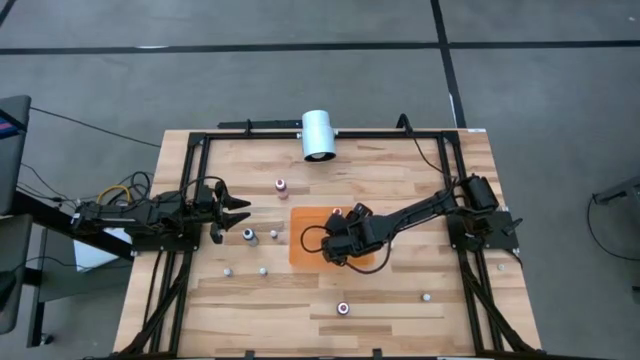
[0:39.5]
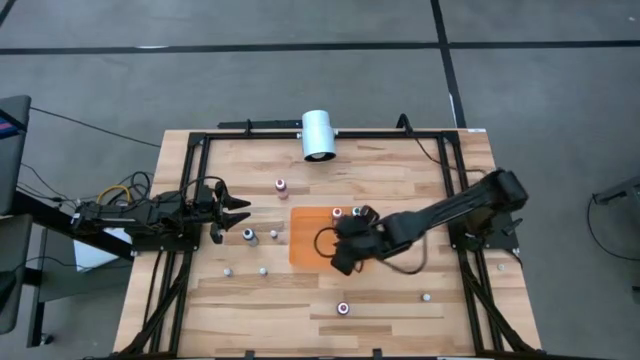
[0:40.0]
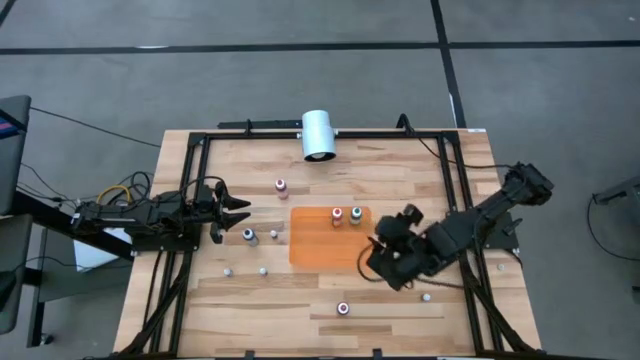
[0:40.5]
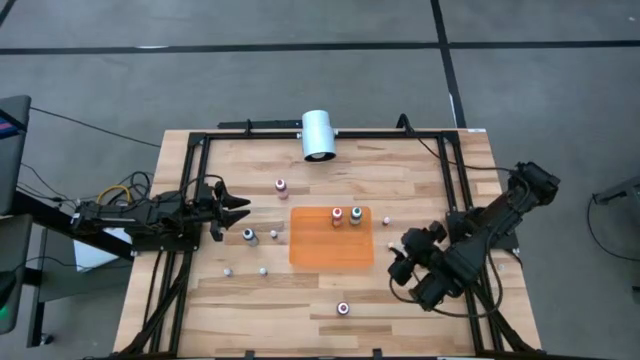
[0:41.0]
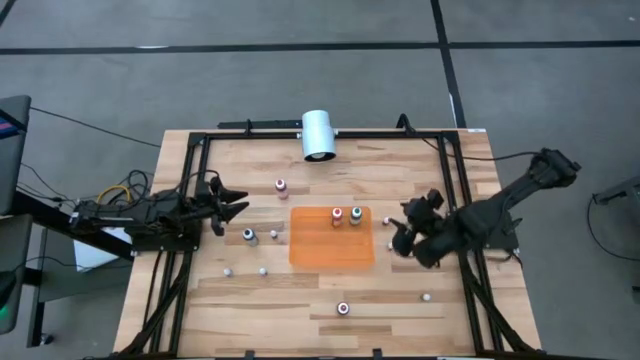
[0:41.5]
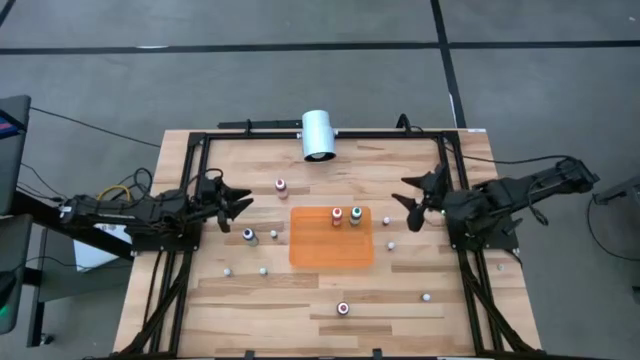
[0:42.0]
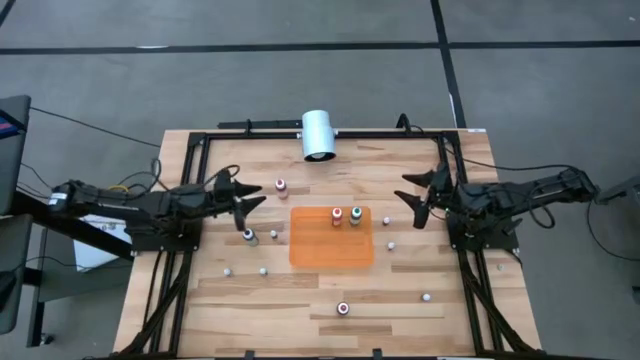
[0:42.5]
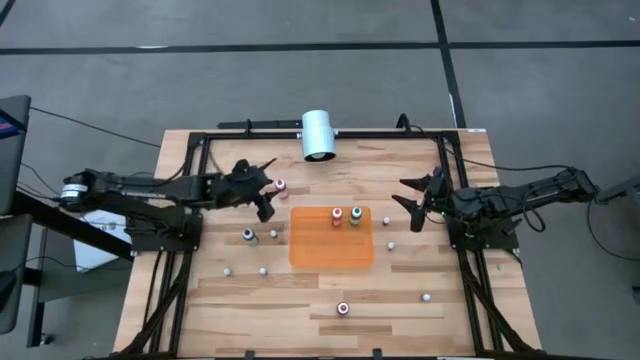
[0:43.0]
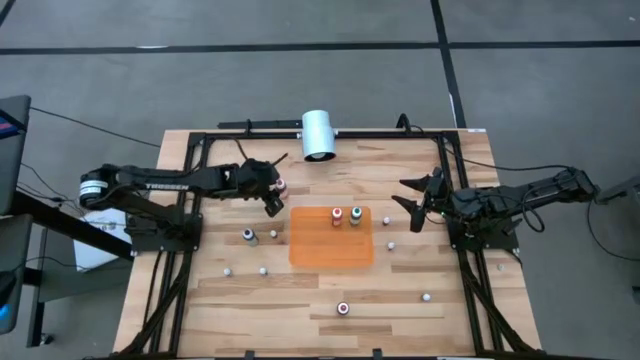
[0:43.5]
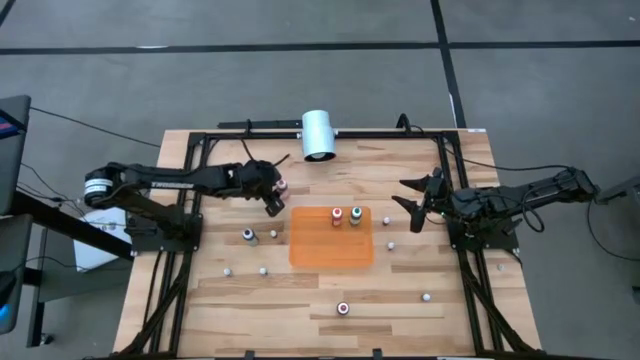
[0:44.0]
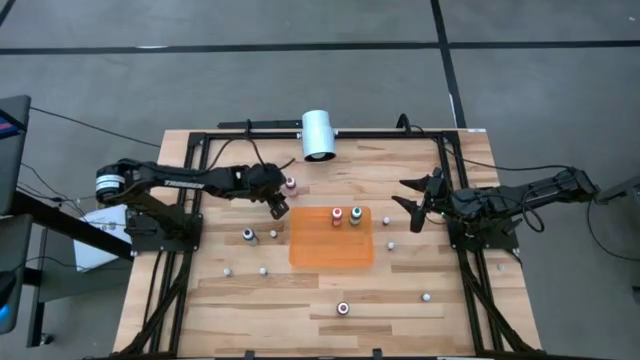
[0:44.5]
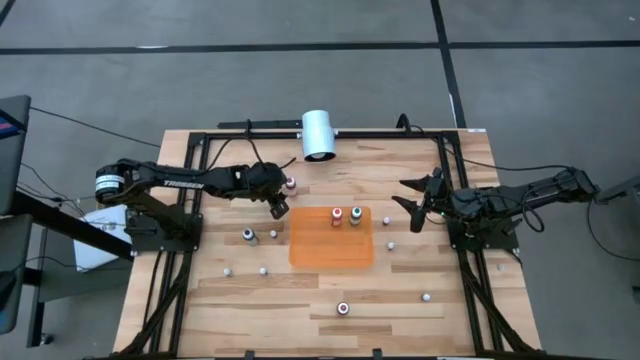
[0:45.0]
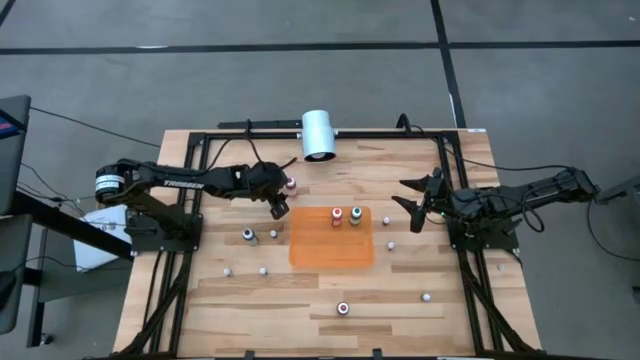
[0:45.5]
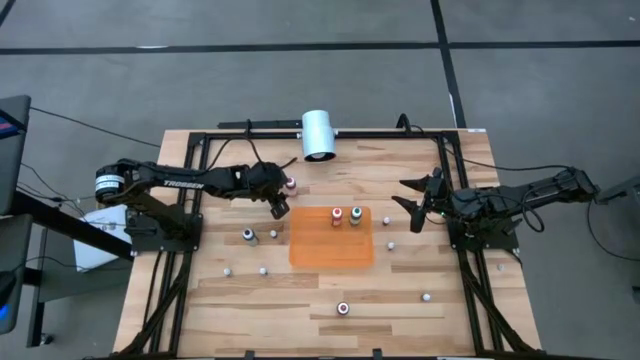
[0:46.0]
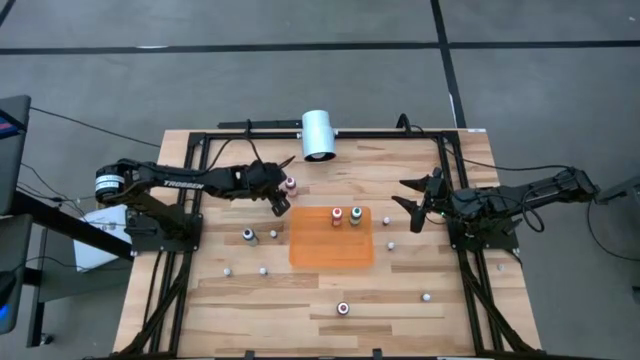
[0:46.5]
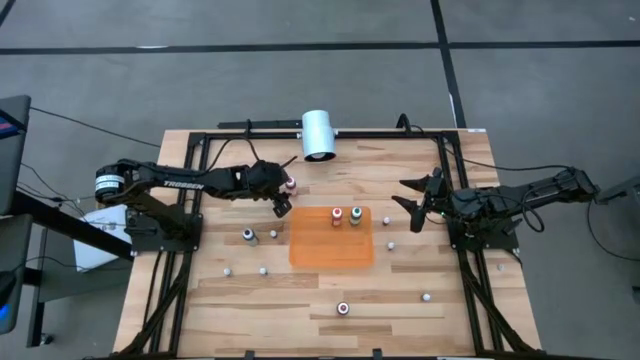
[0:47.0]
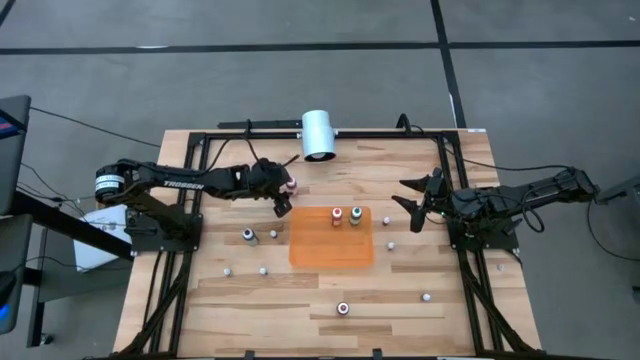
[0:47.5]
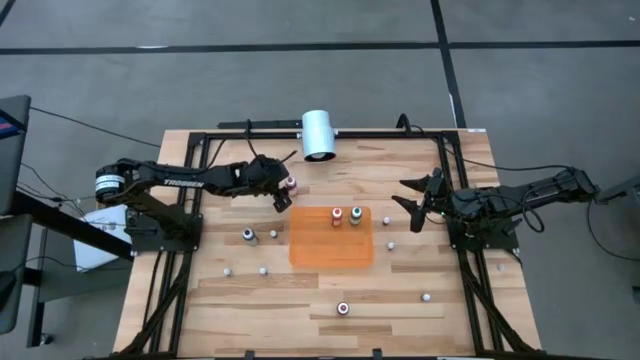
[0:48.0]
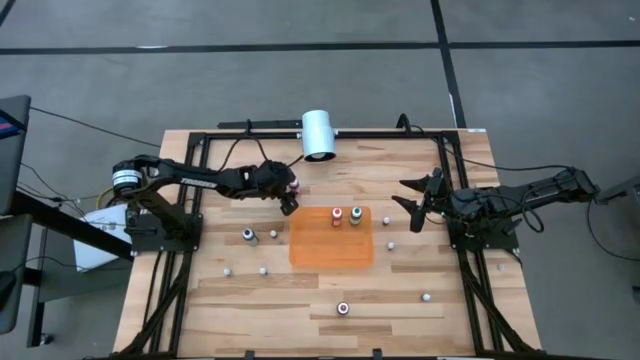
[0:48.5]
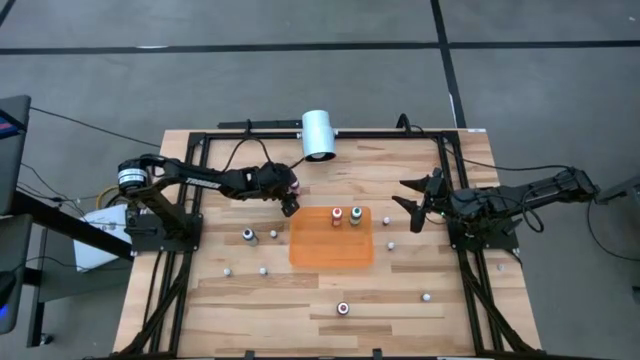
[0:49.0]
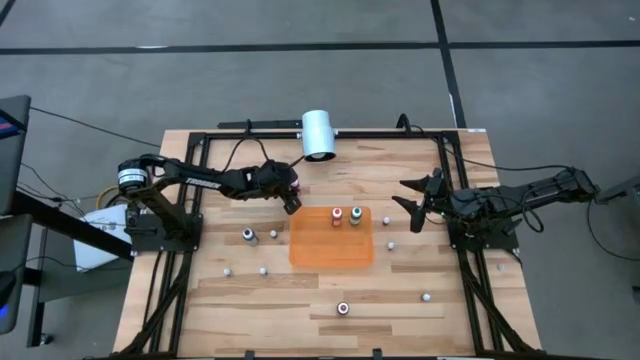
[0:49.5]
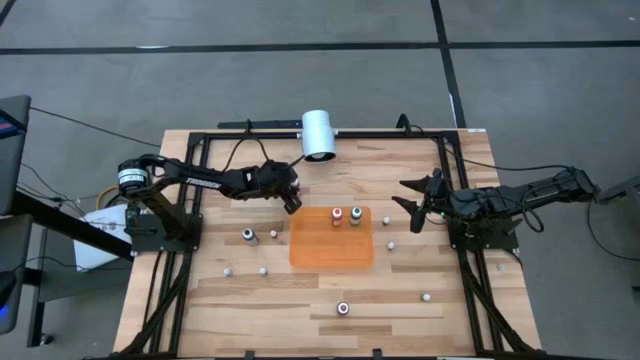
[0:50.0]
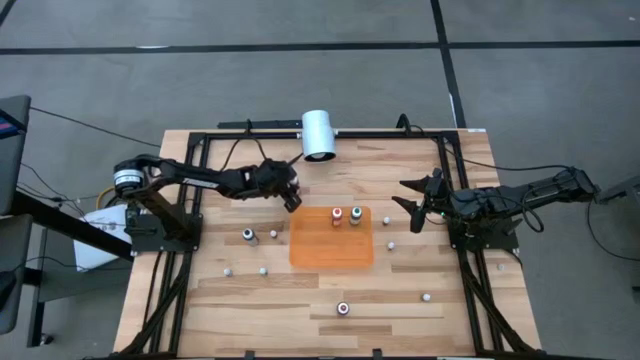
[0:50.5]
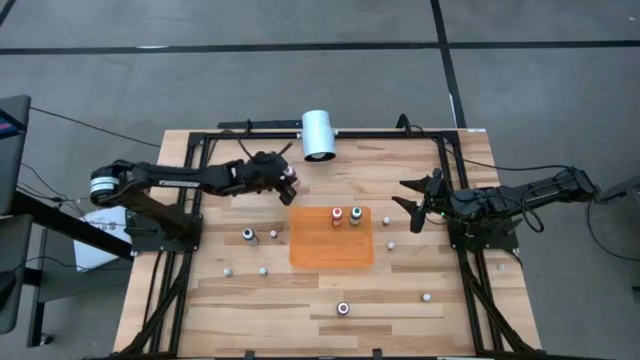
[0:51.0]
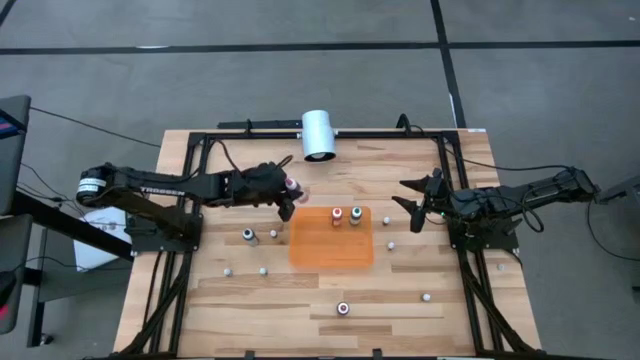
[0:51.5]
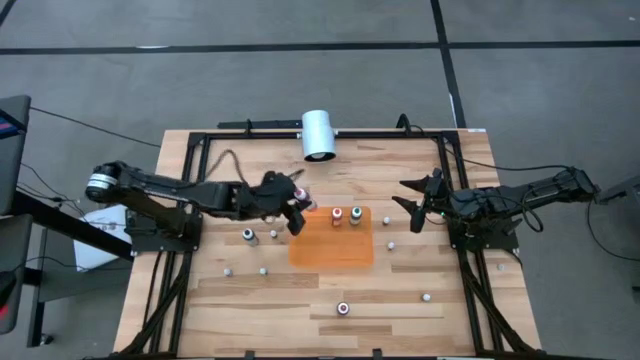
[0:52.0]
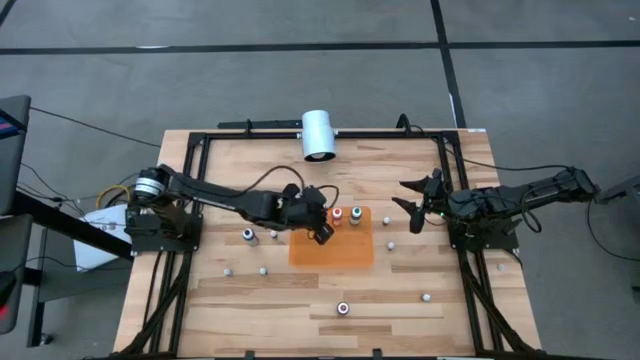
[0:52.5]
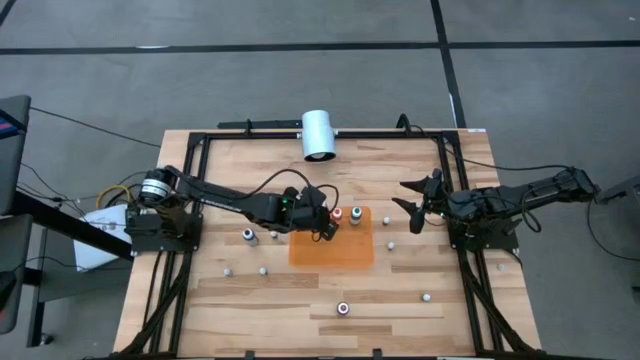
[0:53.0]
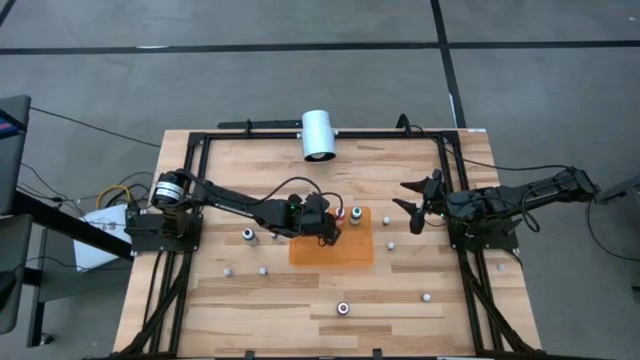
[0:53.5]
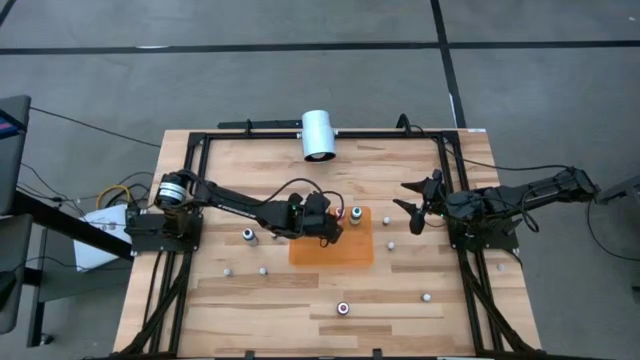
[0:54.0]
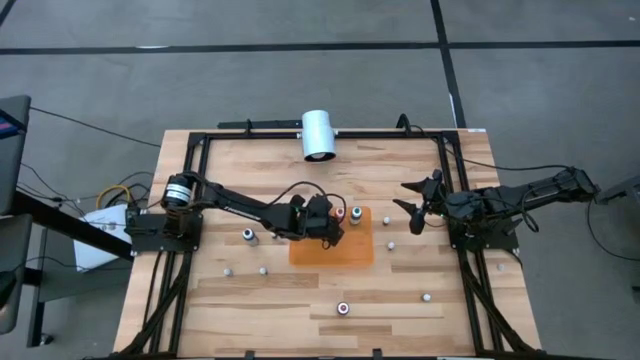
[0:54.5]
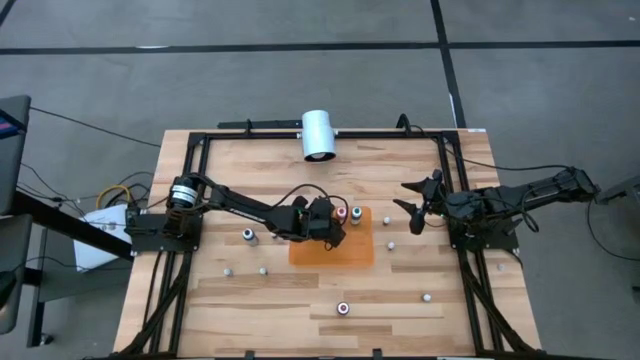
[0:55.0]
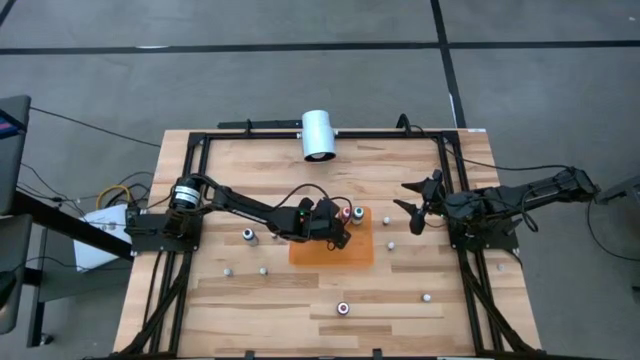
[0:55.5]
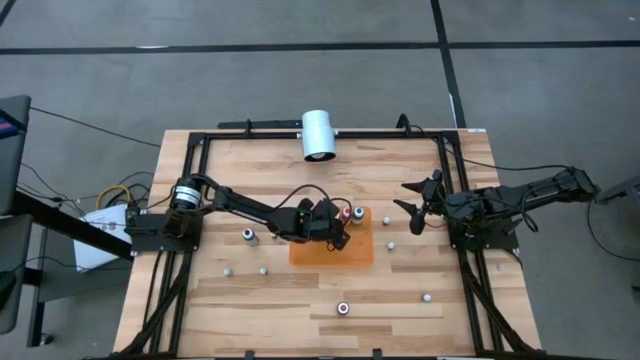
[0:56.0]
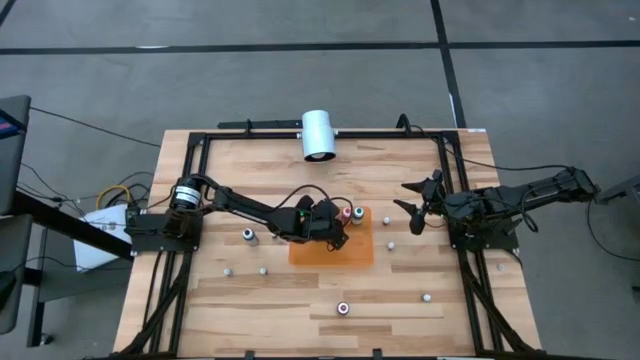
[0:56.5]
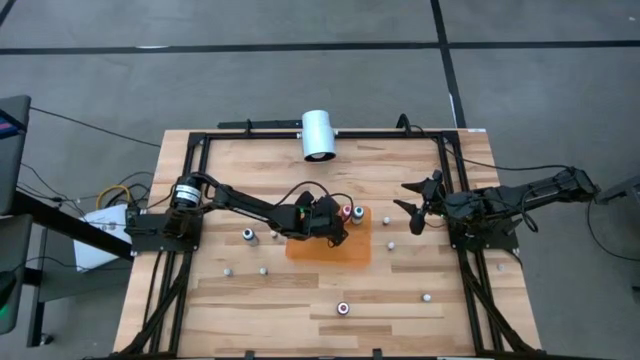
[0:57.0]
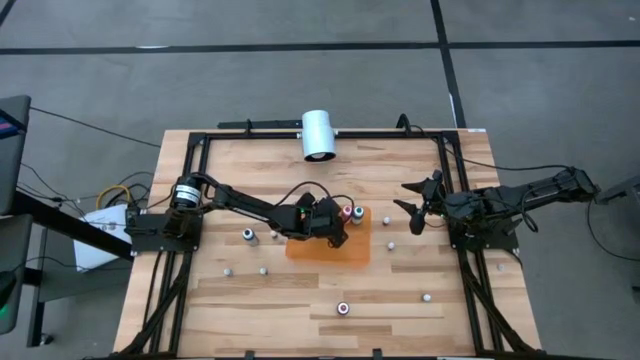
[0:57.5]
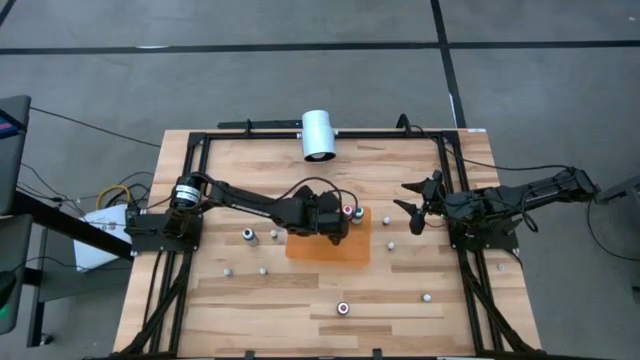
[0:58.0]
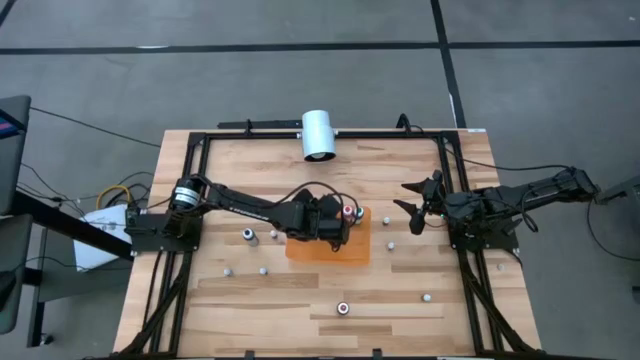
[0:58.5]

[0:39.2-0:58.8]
Task: Pick & Place food coloring
Put the large pink food coloring into the orange bin

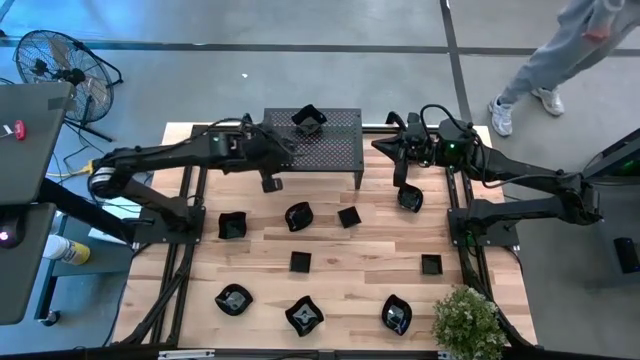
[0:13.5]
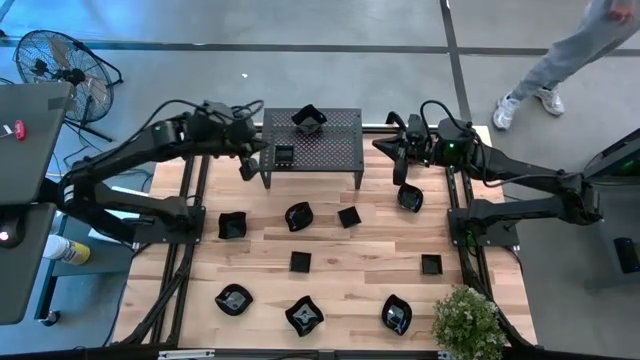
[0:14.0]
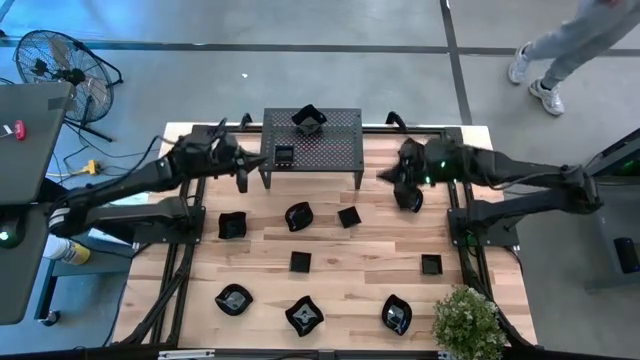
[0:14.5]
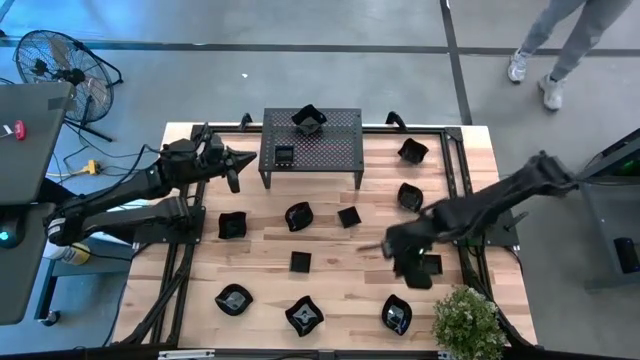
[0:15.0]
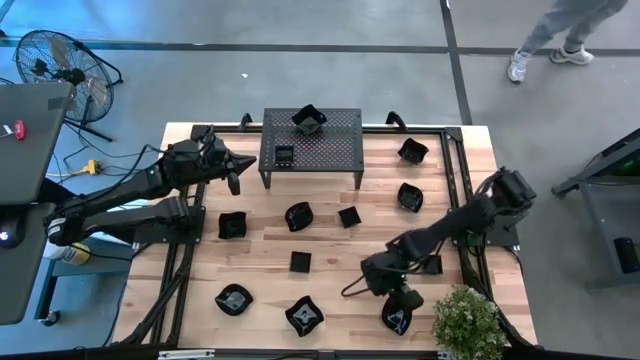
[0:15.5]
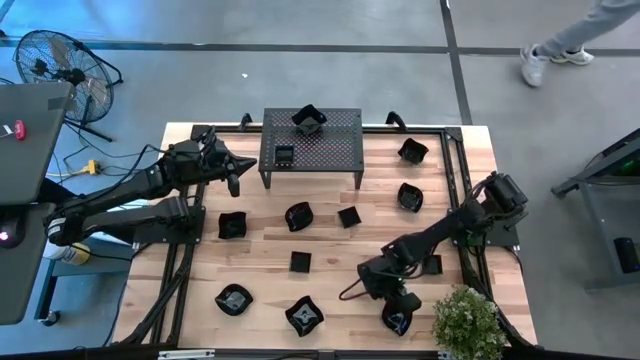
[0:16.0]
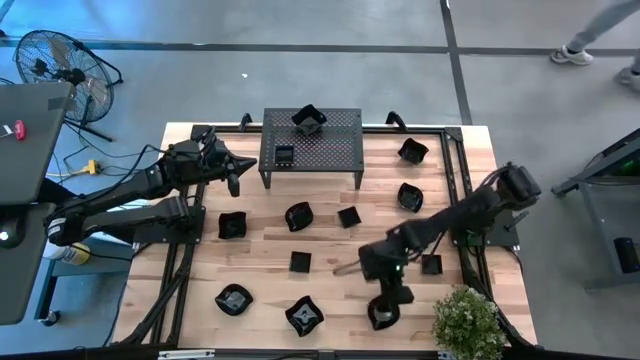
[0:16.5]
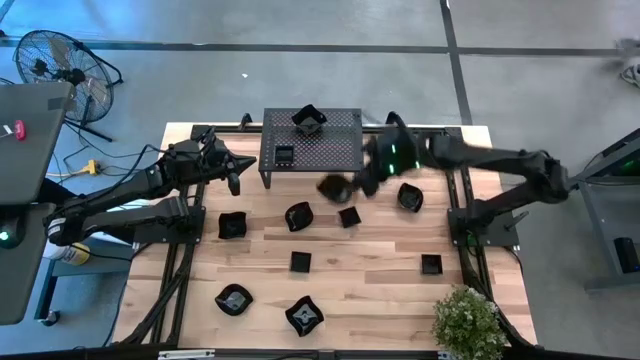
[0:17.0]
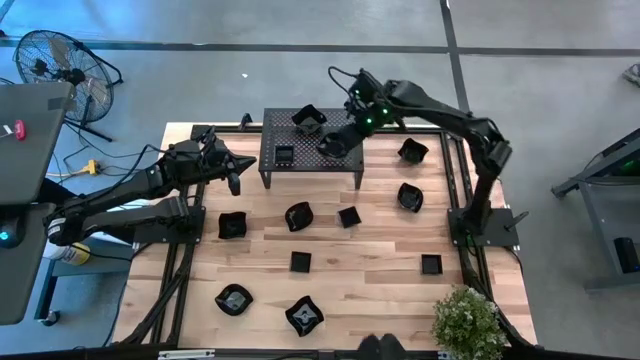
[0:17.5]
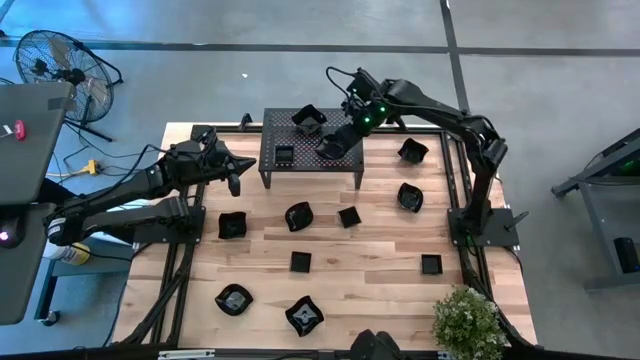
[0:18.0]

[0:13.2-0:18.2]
Task: Pick & Place Mini shaped plates
Put the black leaf shaped plate on the shelf
